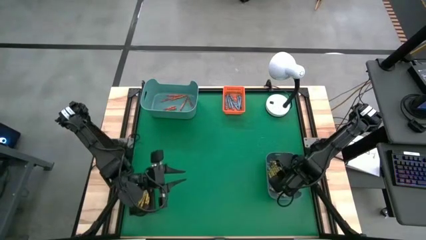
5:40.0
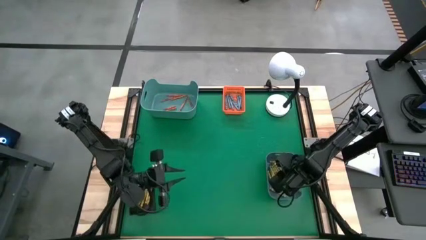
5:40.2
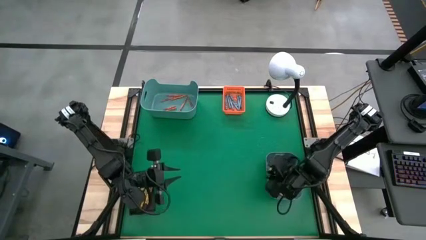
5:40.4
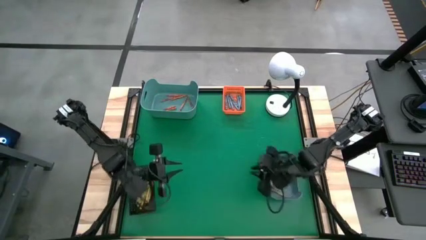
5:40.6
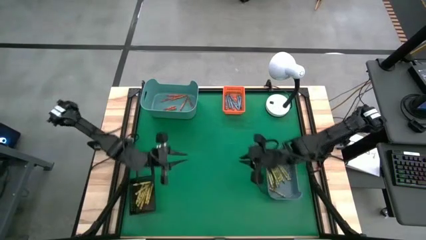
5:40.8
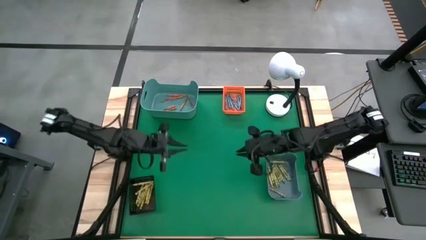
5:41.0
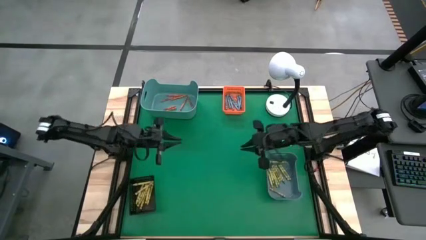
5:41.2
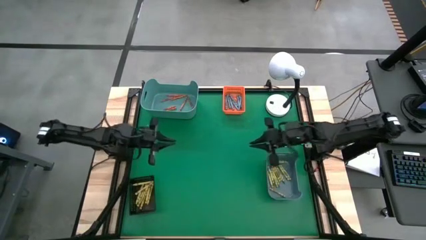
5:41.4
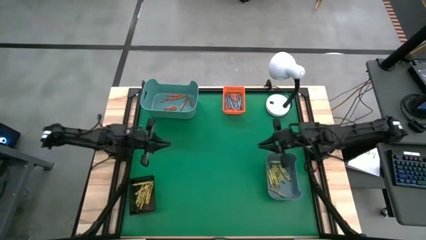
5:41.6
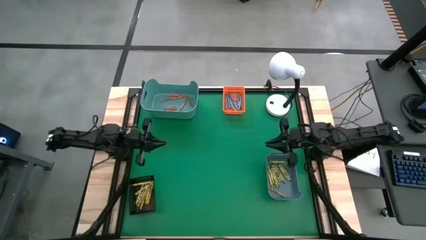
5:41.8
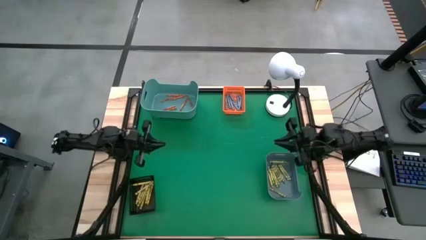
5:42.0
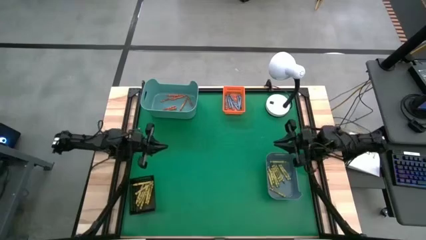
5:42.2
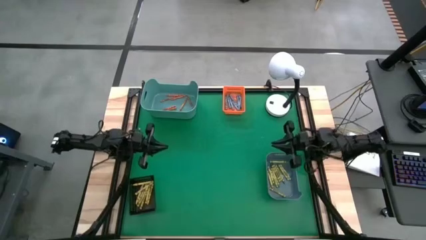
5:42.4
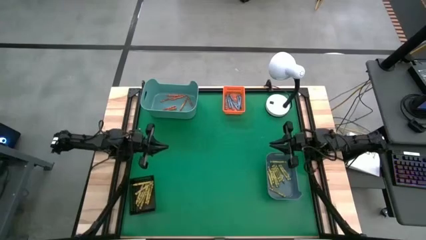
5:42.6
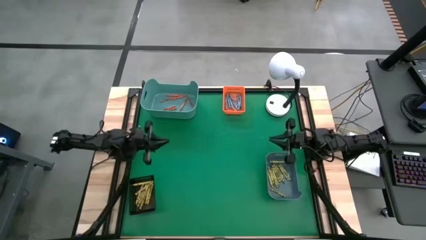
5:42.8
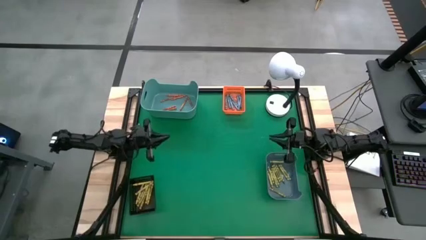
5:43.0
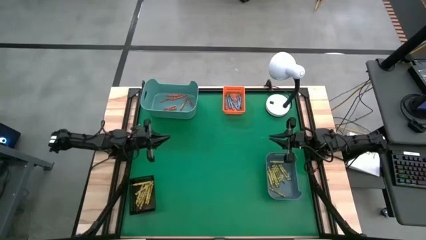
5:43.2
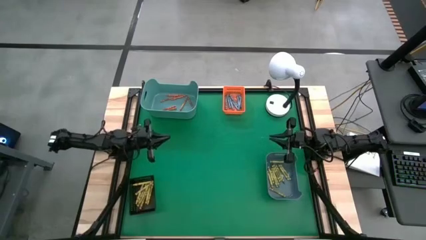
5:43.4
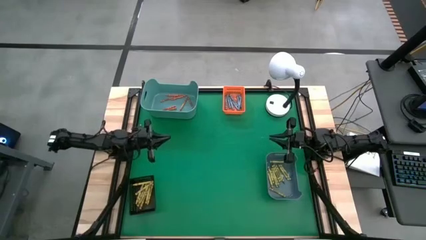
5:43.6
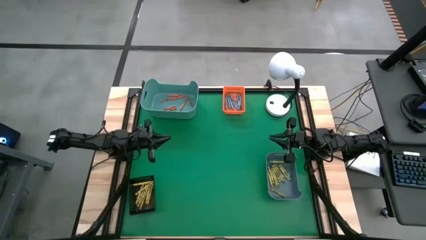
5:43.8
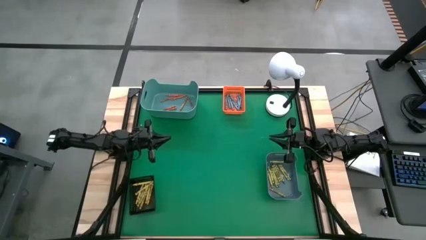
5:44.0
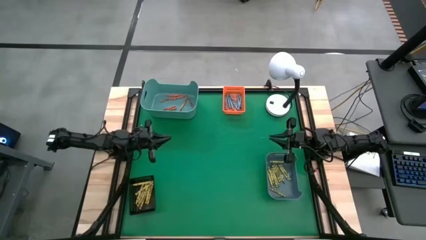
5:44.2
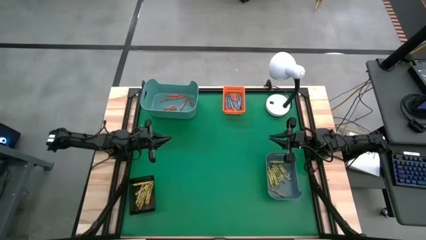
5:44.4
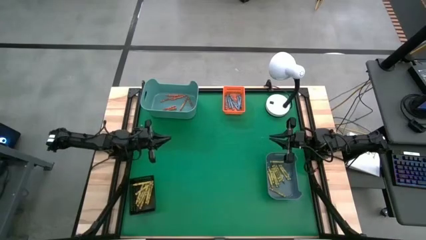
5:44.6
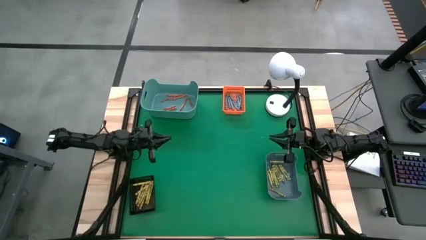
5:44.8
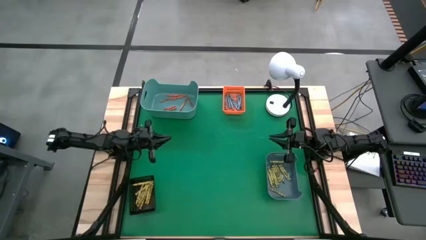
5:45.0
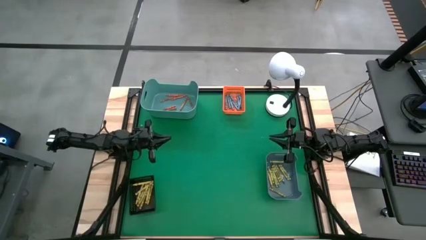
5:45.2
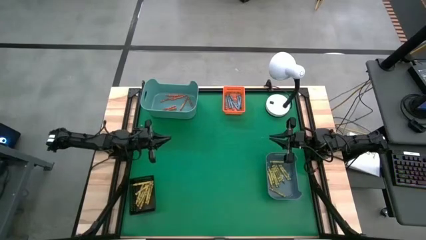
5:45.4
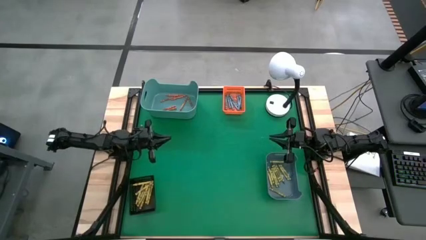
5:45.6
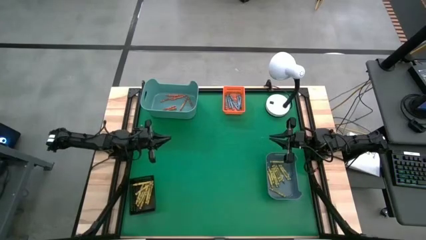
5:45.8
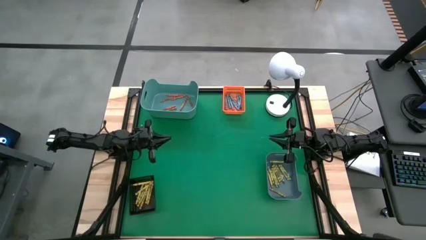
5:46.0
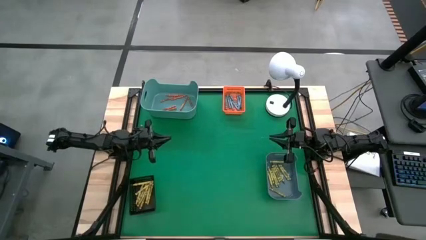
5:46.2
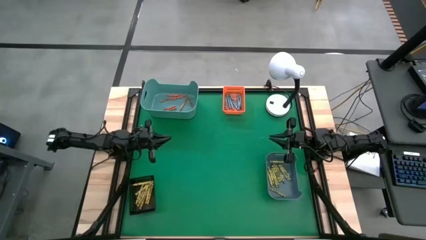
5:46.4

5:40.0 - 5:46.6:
Task: Sort crayons
Return to Home Position

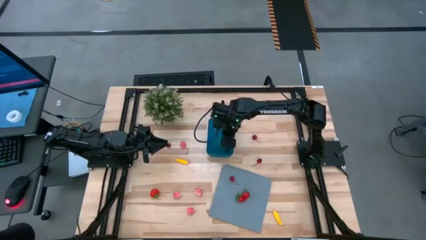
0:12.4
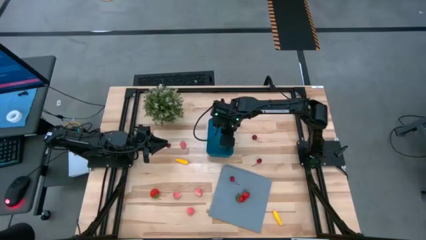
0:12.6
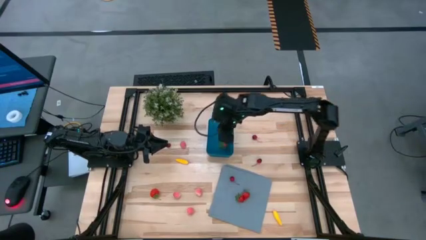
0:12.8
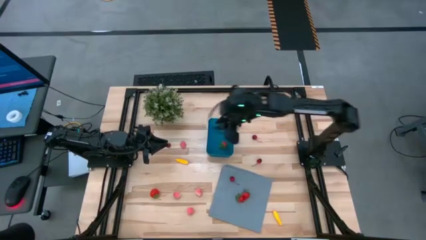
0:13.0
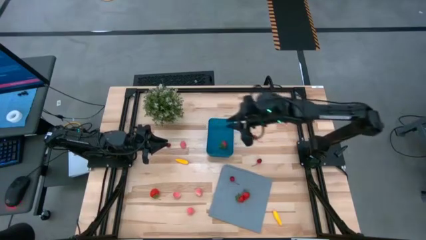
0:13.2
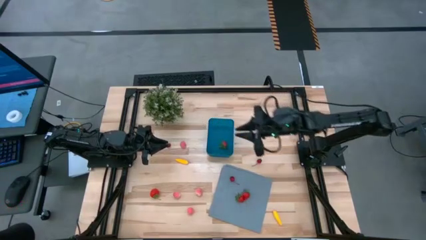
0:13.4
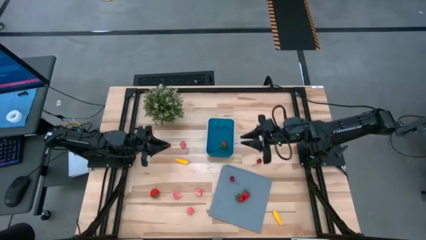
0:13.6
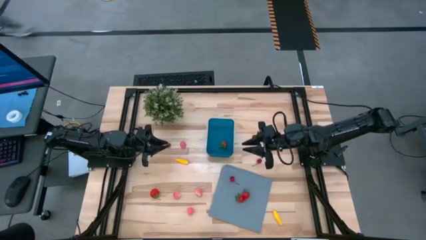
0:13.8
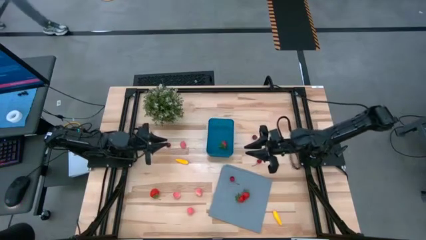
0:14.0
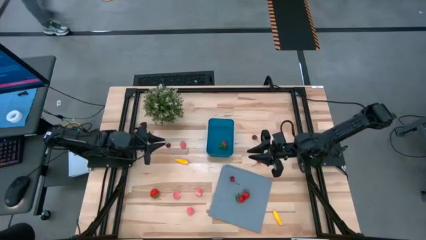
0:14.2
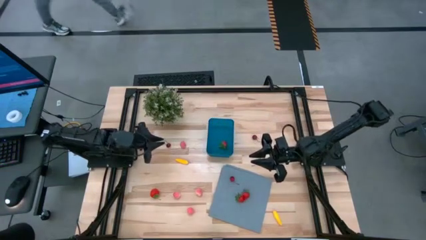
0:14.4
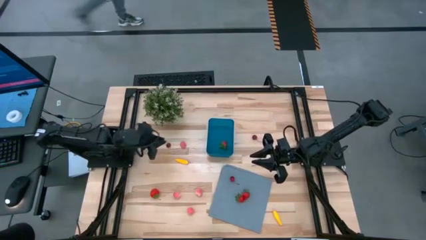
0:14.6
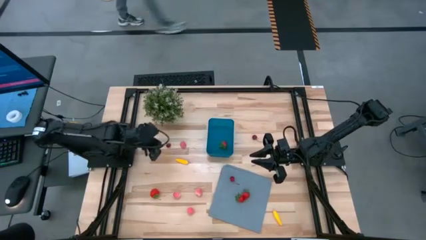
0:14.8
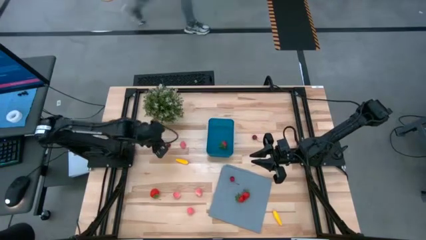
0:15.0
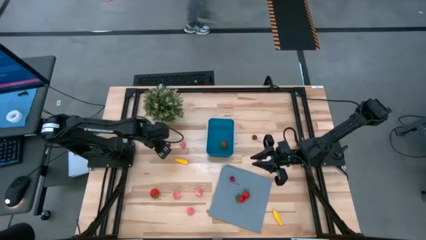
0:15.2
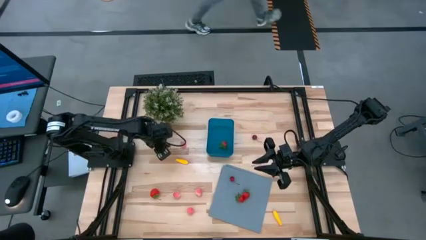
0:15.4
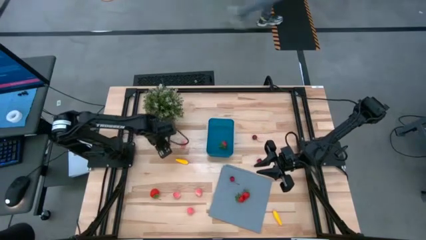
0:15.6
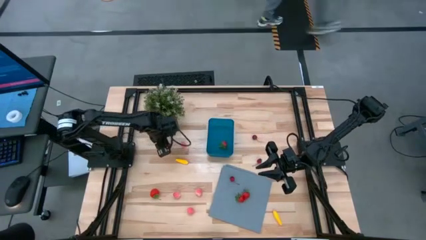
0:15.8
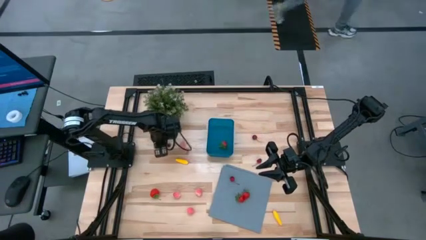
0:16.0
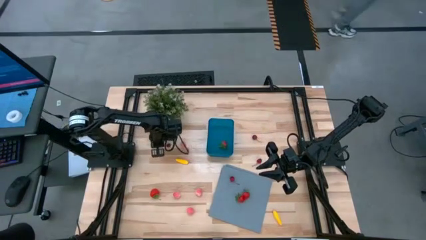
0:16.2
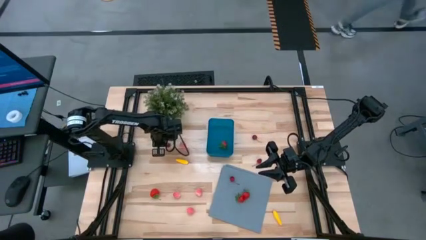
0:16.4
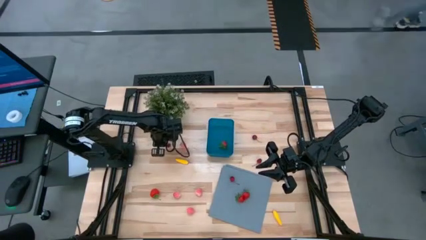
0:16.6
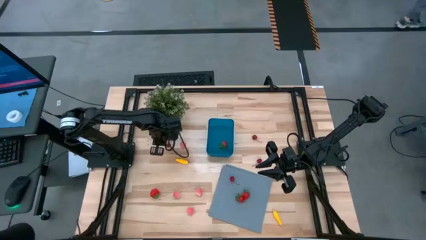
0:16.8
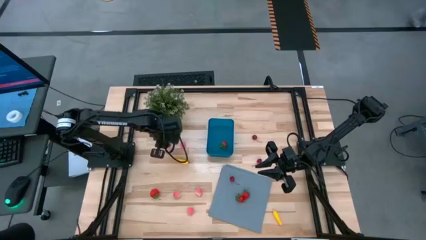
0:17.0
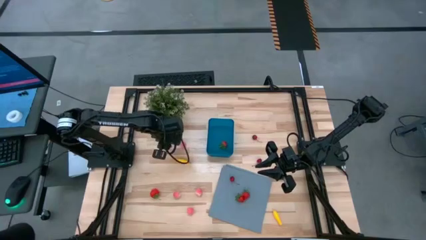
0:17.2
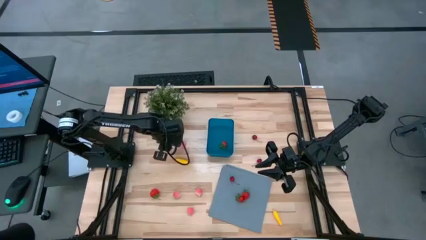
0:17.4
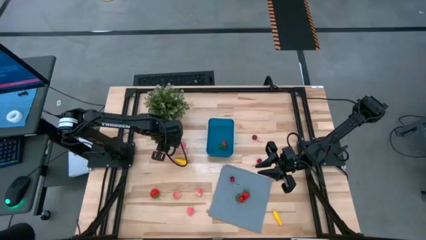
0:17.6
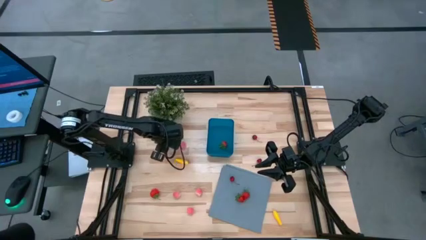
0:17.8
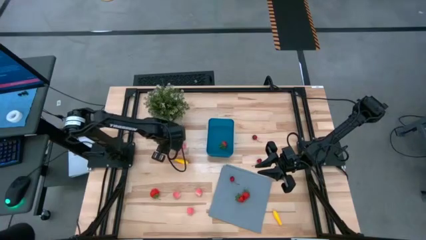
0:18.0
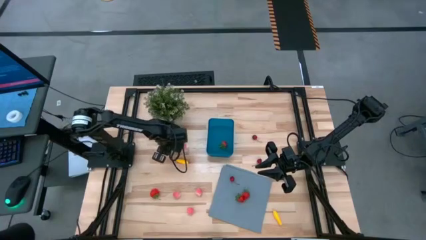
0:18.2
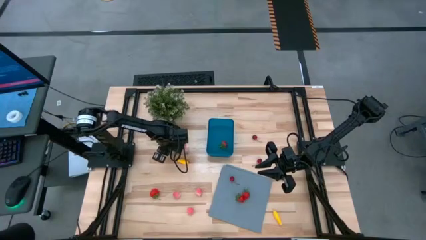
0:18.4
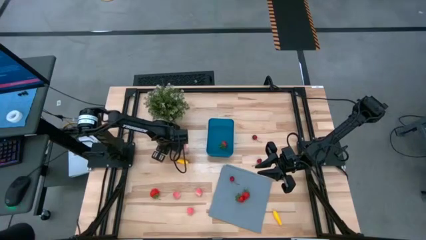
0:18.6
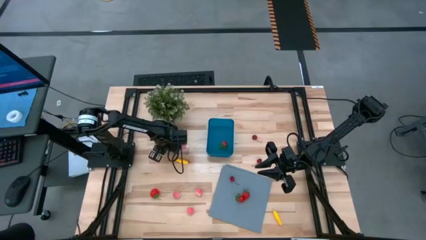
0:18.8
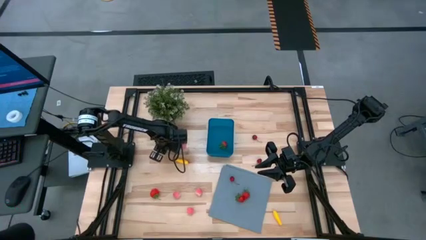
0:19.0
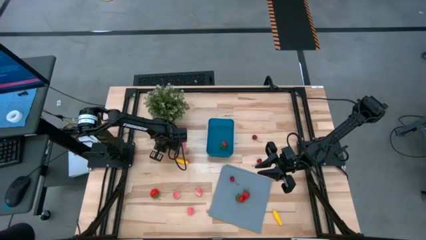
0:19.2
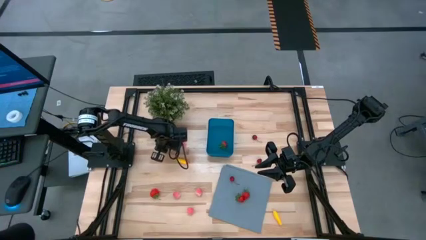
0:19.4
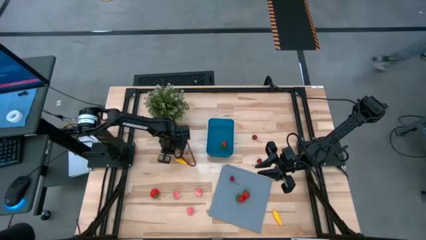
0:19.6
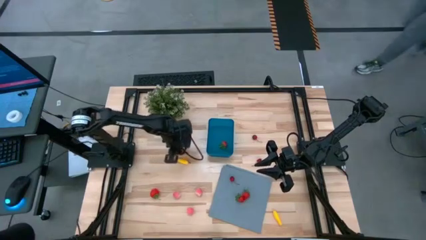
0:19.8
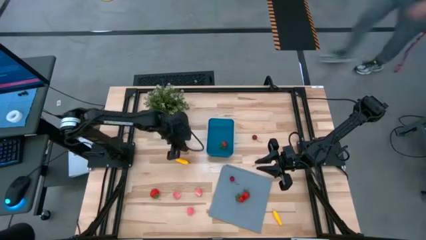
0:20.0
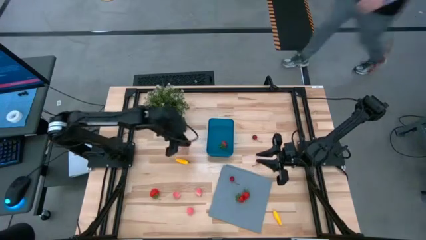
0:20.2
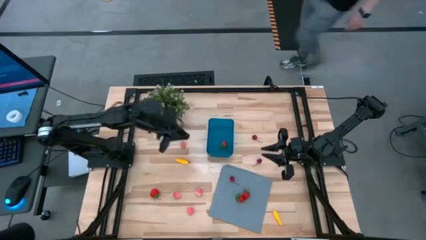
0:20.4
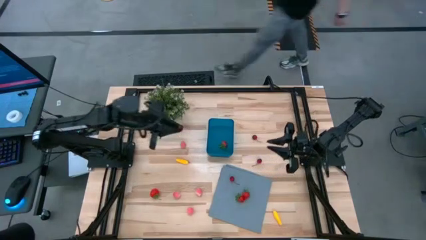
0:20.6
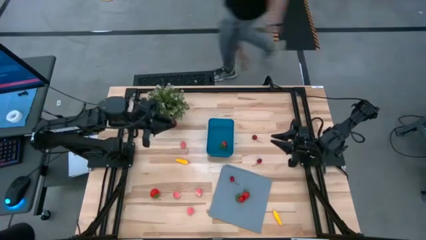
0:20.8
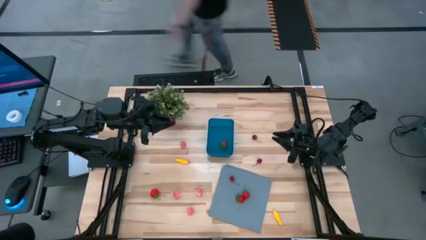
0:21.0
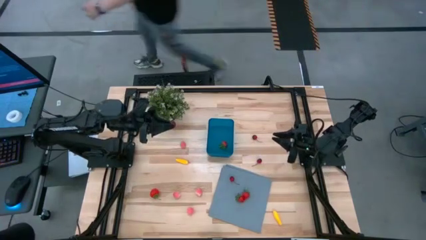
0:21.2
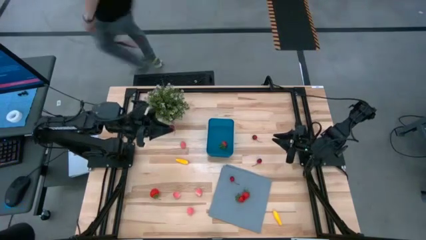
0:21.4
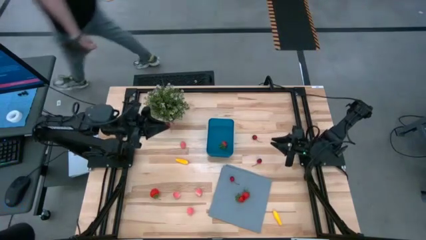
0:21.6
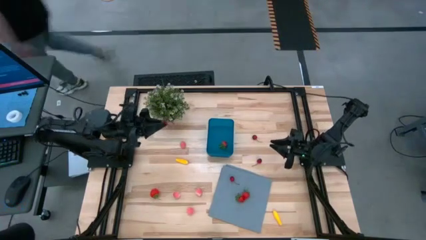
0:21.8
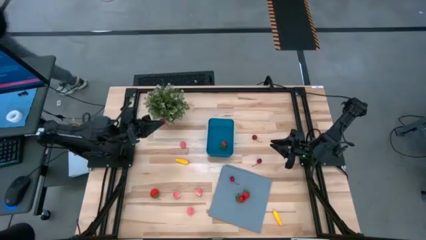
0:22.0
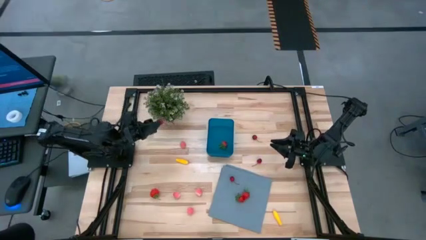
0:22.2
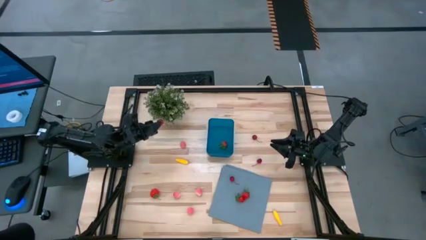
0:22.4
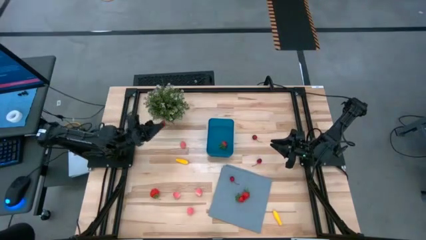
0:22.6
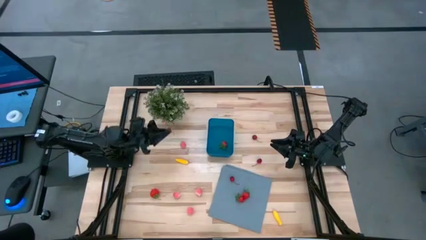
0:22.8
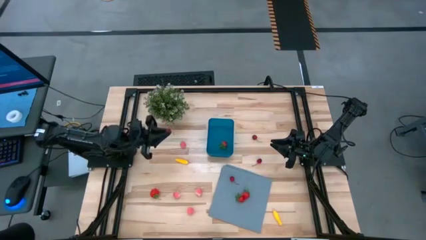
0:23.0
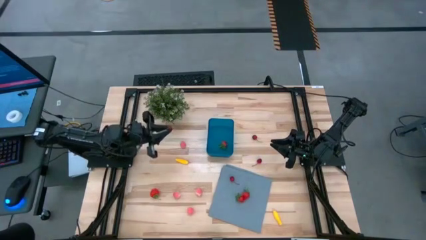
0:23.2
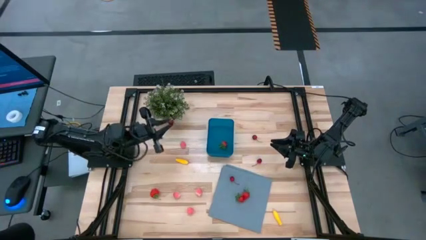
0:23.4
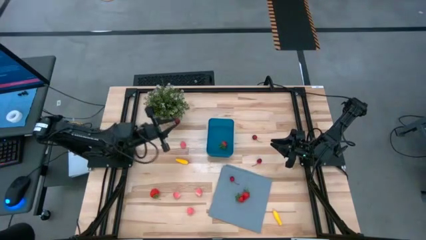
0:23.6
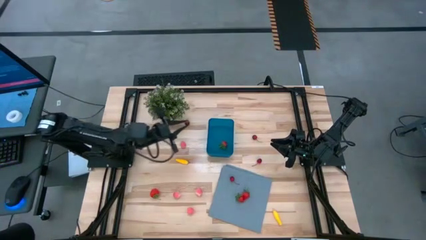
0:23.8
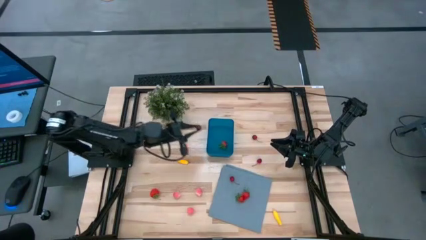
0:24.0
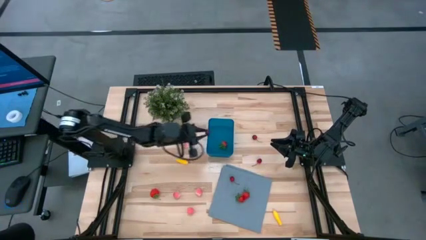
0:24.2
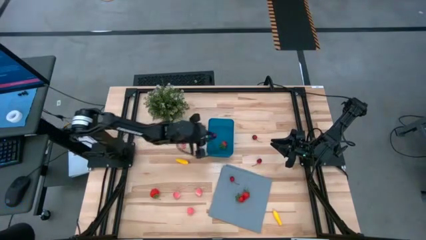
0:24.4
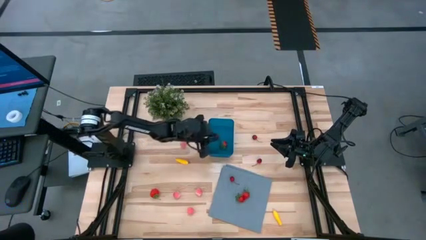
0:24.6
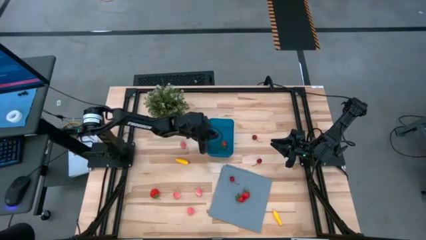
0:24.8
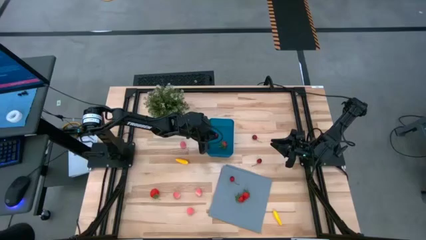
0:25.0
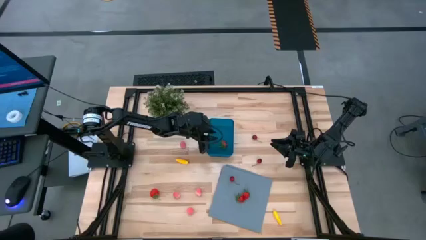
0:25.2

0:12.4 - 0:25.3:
Task: Pick and placing Produce into tupperware
Put the cherry into the blue bin
